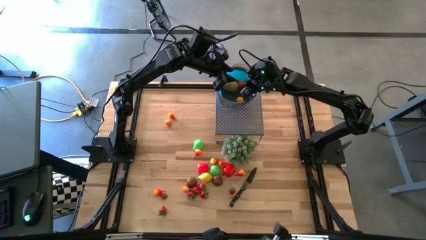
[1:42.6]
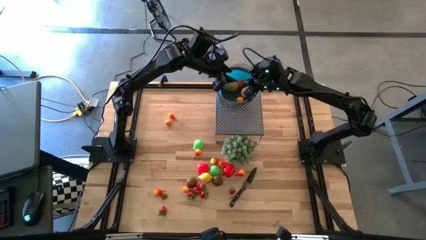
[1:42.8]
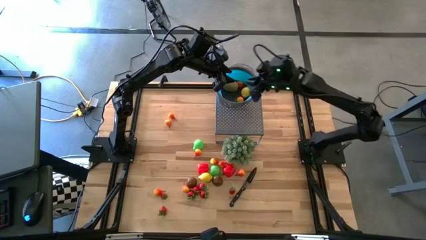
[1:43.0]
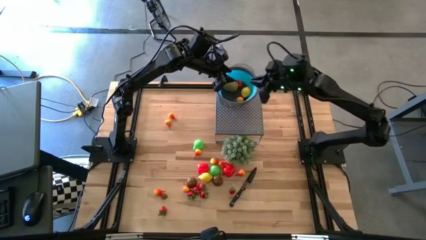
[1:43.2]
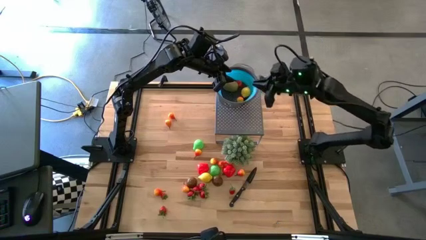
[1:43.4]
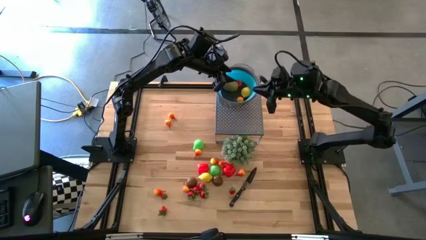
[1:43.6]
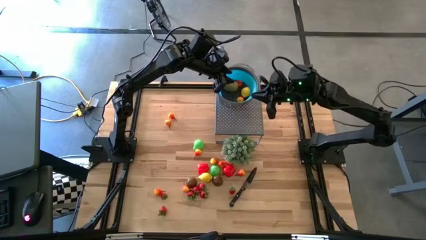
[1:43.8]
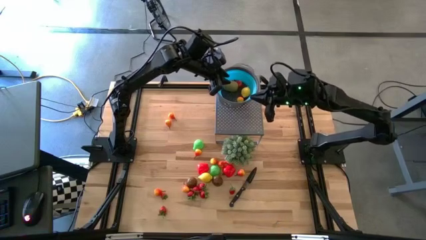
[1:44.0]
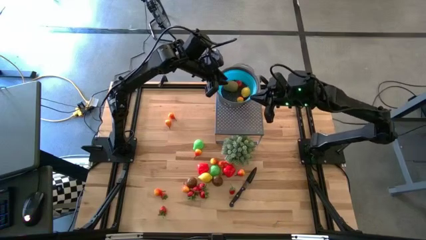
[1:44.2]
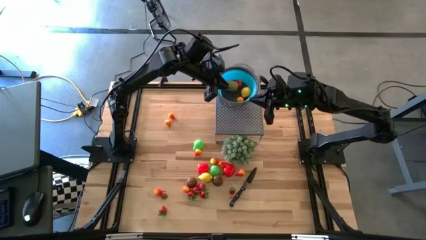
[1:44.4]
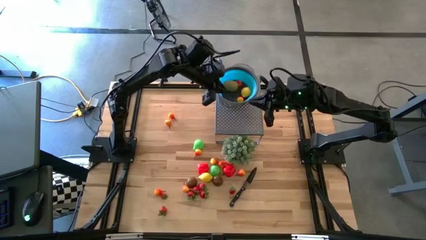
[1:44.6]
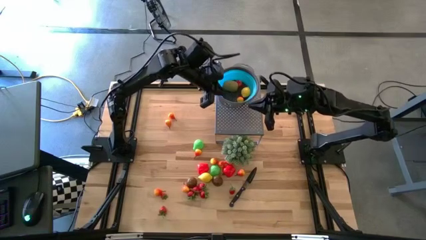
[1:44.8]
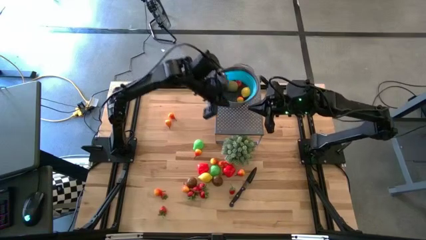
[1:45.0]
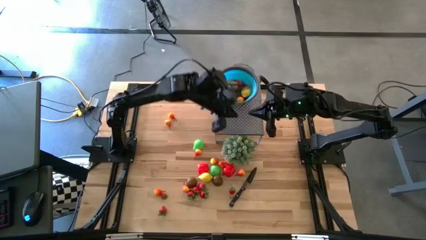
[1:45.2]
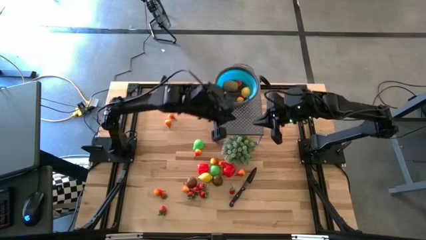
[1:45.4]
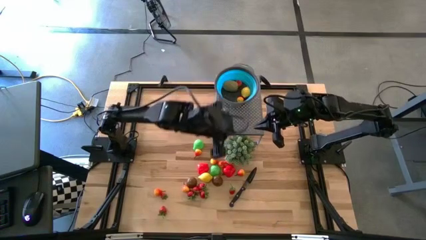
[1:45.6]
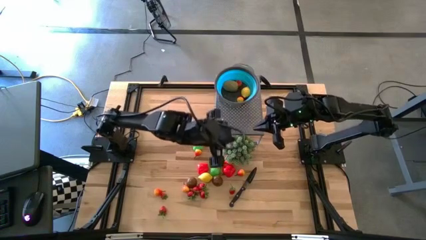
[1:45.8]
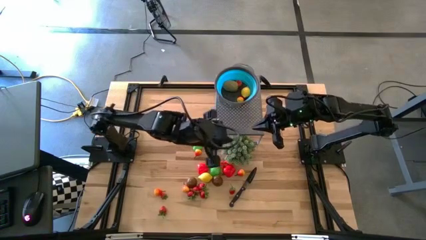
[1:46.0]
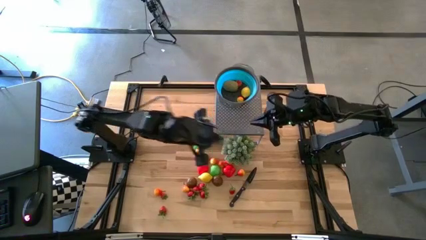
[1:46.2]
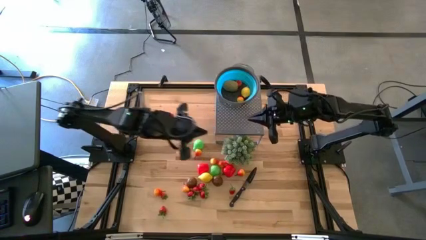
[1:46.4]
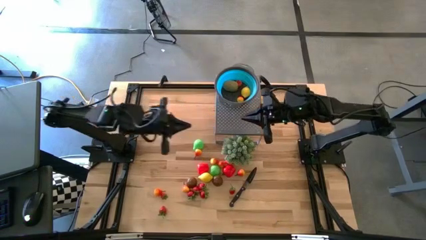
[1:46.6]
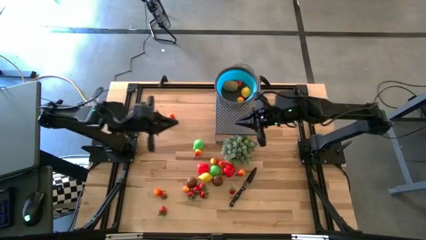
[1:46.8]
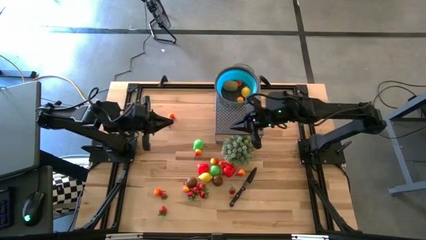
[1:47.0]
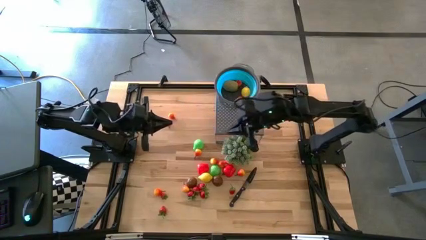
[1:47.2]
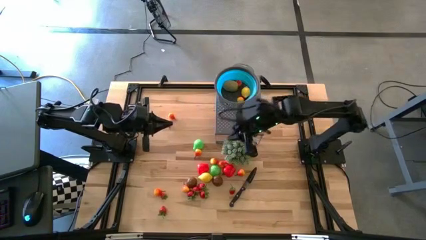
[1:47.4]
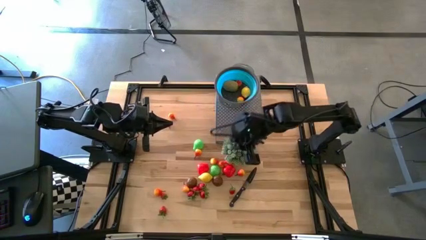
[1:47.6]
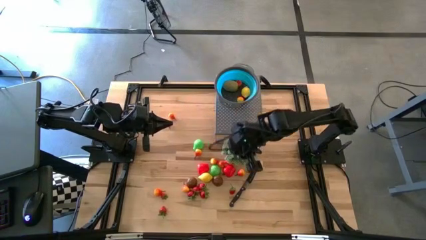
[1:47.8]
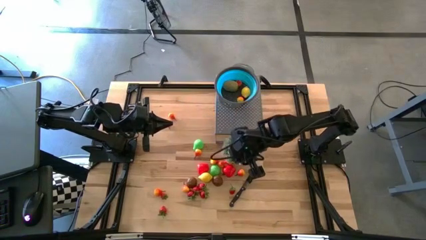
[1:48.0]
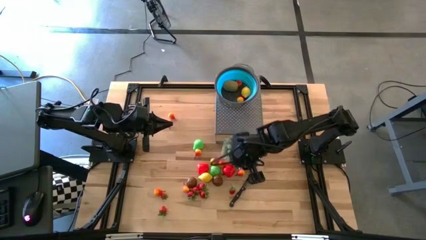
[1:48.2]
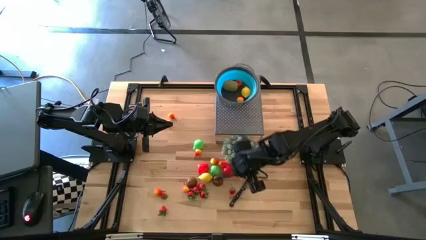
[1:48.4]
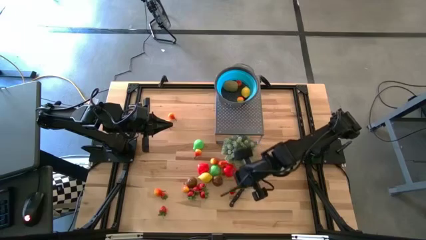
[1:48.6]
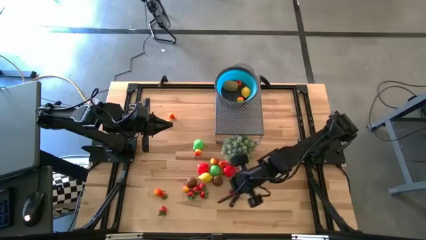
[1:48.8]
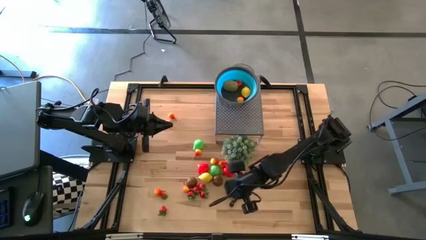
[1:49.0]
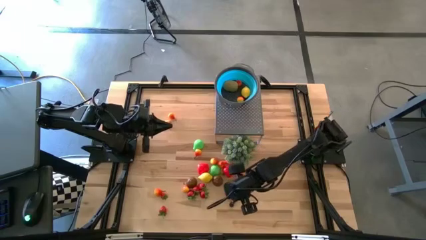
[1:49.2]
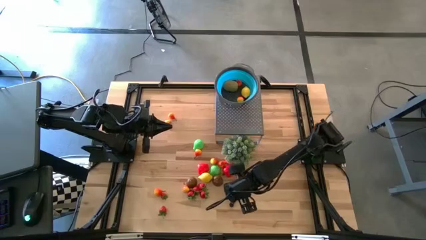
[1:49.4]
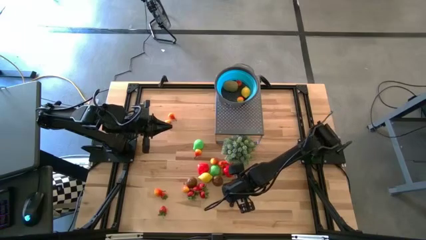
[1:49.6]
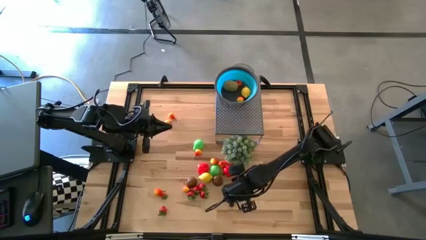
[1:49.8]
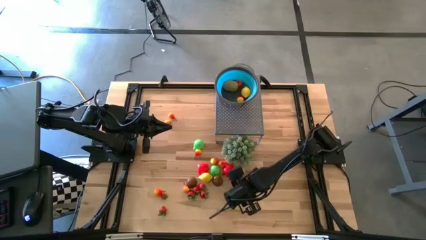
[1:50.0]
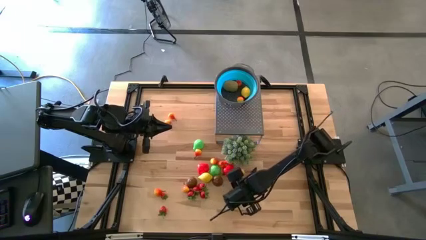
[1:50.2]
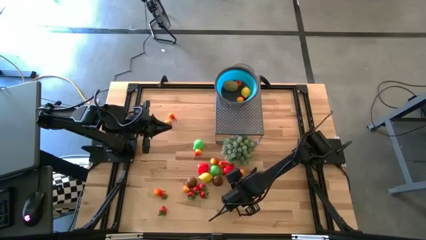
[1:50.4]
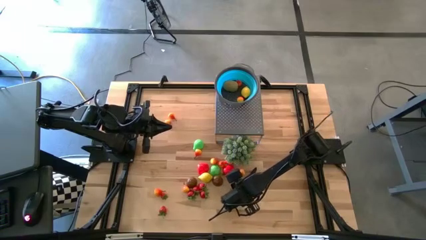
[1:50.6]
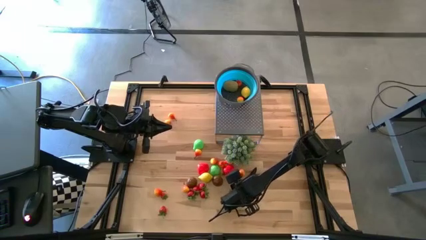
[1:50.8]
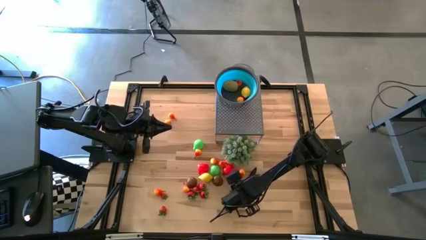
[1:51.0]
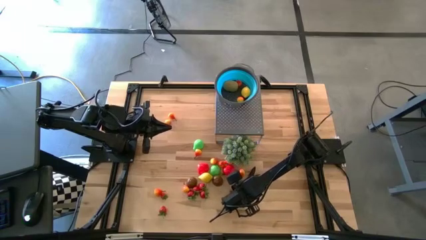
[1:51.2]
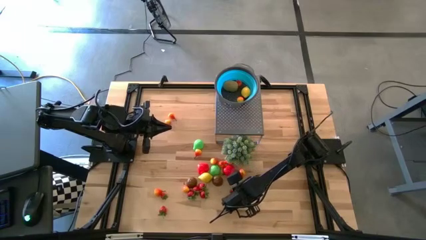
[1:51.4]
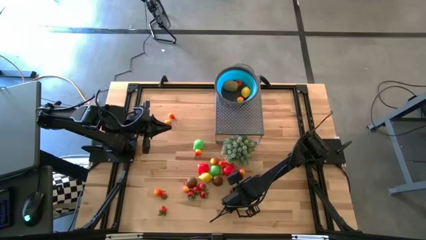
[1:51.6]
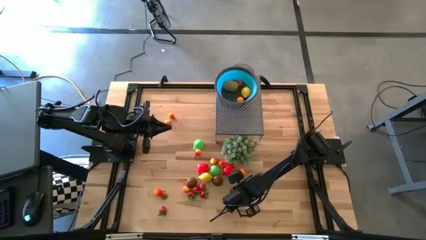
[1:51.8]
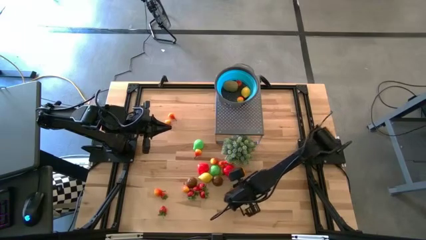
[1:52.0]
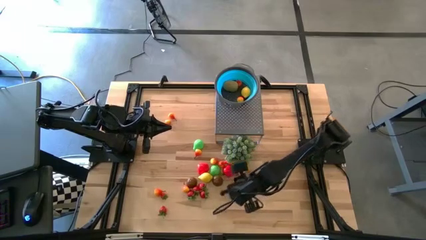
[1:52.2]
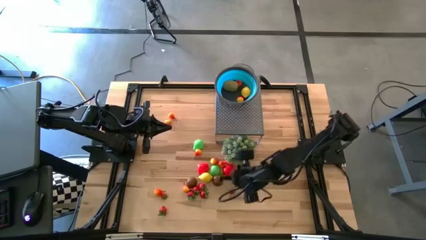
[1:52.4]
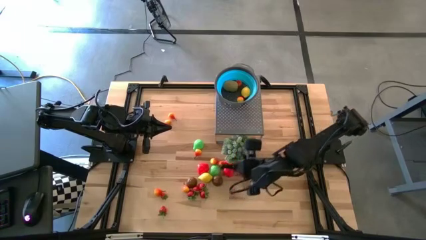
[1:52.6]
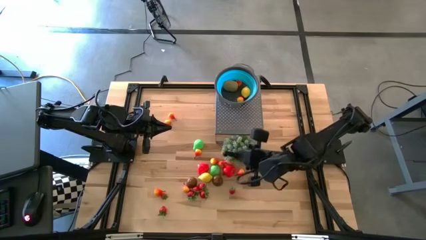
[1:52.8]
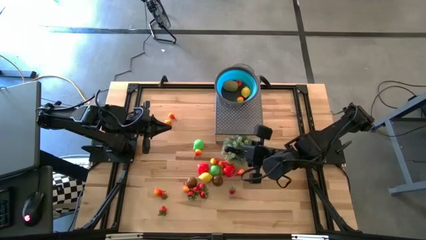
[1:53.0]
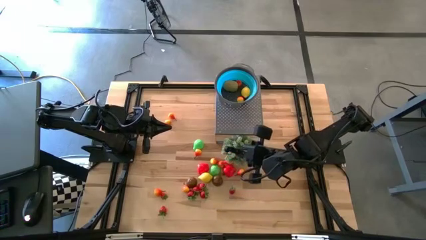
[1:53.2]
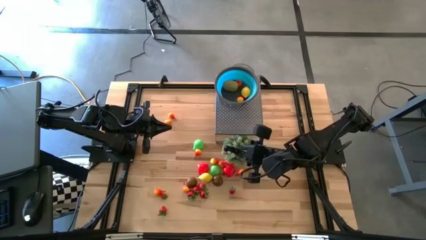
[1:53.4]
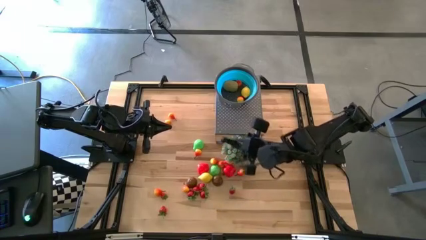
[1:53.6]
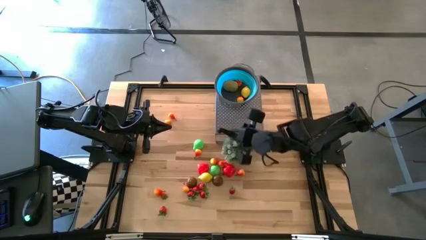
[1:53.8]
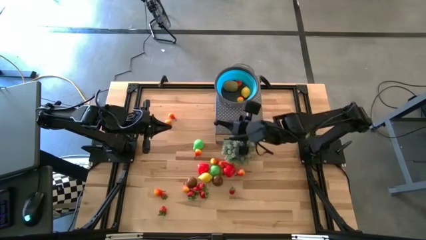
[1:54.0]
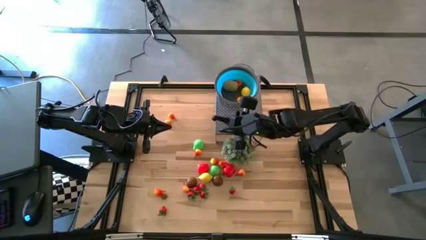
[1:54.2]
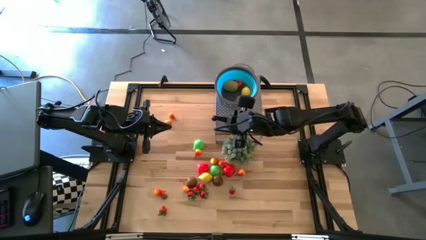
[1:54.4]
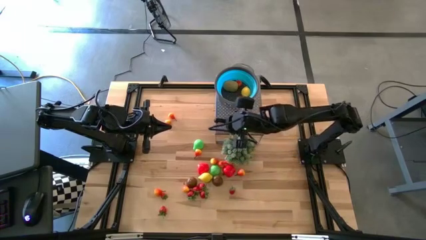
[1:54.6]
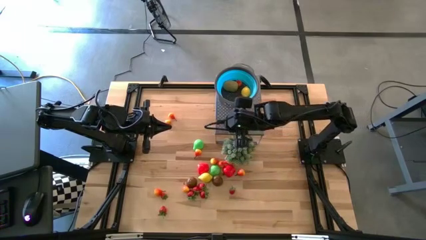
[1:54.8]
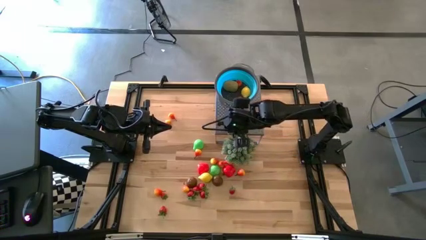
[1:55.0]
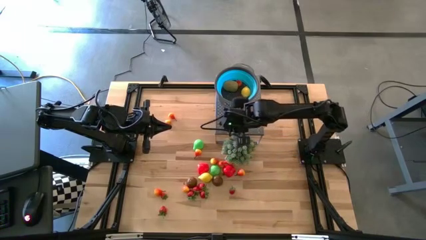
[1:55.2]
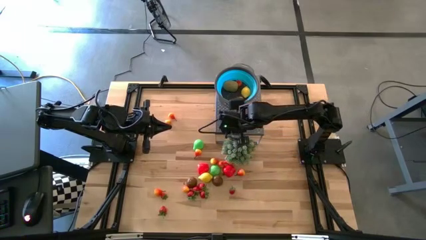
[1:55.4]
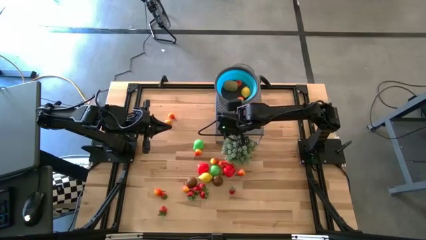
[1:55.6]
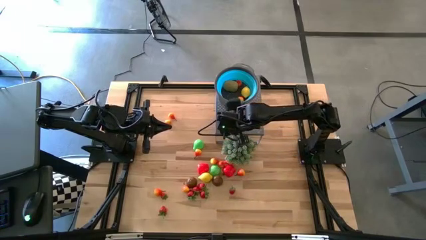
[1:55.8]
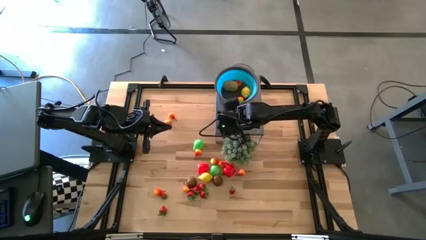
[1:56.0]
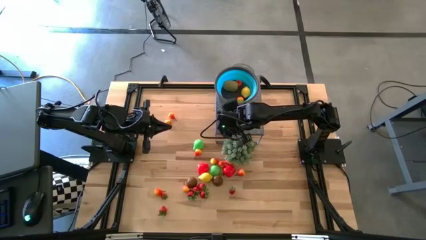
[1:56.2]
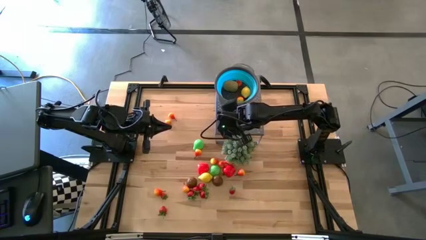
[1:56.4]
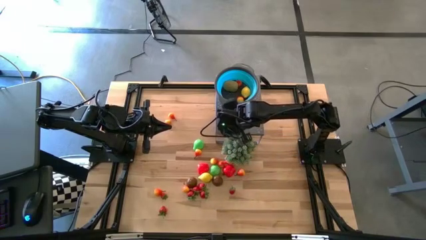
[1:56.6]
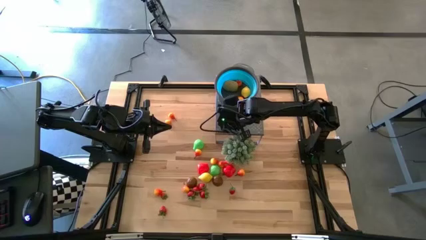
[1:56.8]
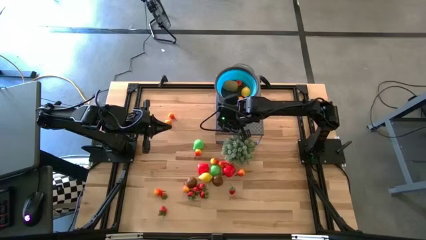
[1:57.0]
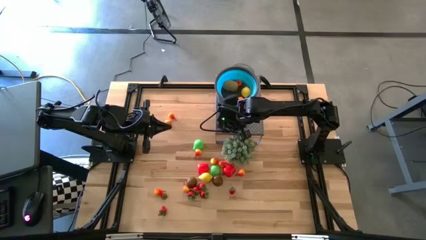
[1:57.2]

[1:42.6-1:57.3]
Task: Pick & Place Fruit
Put the black knife on the shelf

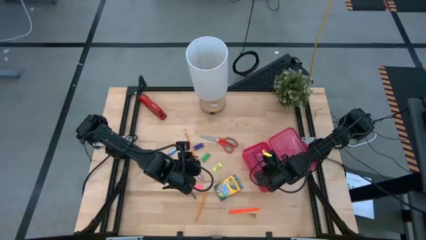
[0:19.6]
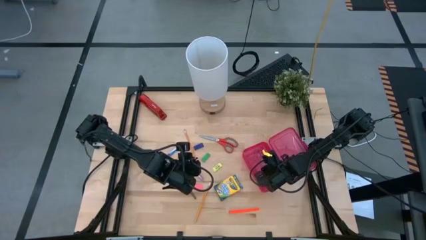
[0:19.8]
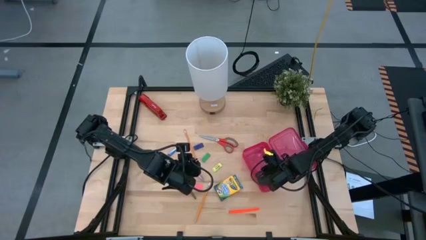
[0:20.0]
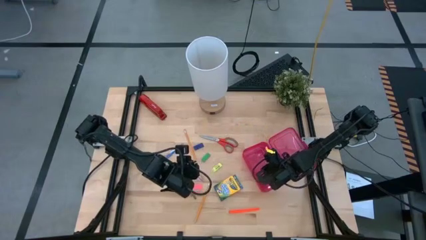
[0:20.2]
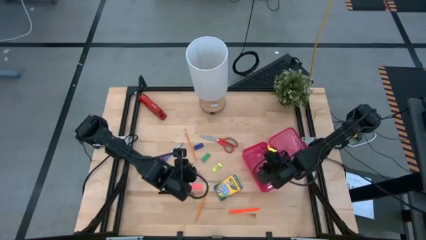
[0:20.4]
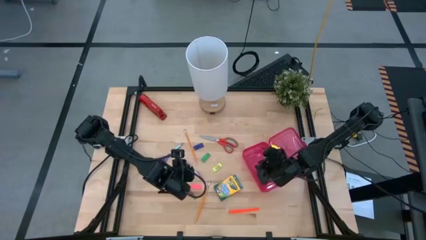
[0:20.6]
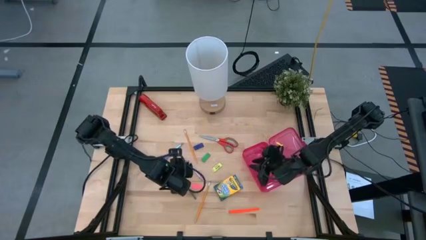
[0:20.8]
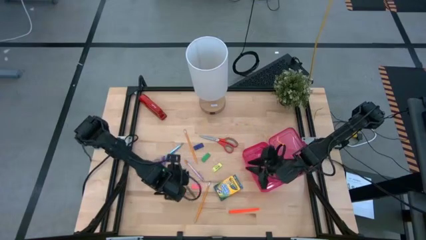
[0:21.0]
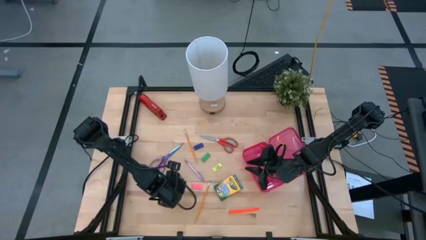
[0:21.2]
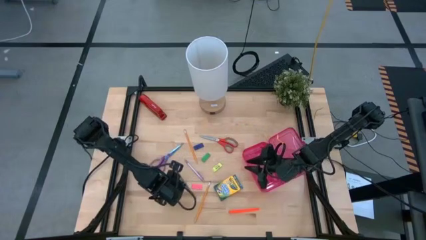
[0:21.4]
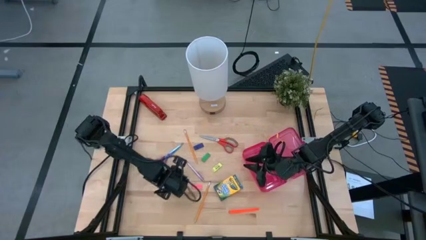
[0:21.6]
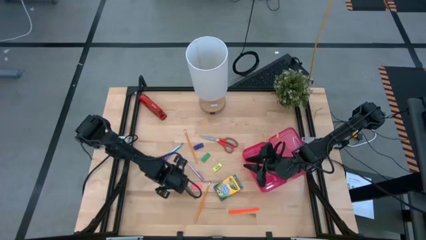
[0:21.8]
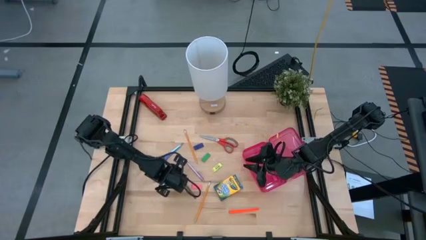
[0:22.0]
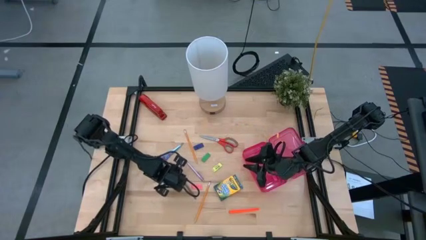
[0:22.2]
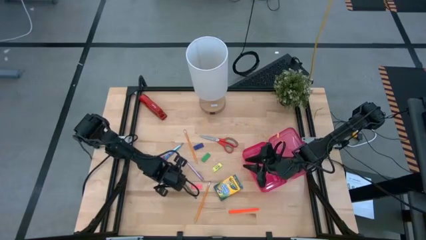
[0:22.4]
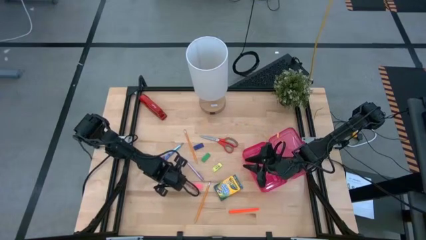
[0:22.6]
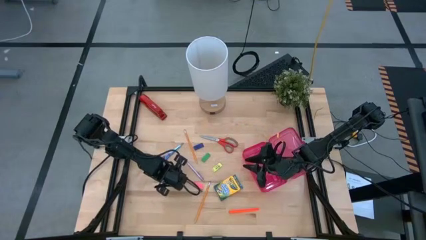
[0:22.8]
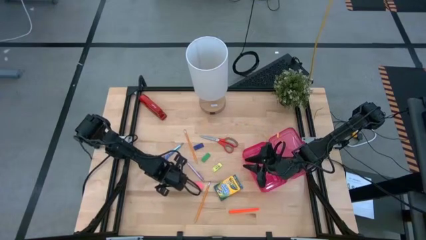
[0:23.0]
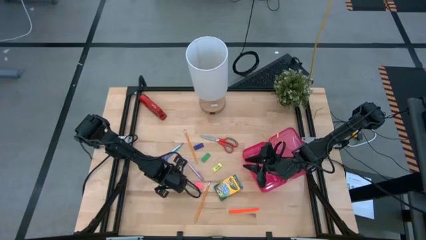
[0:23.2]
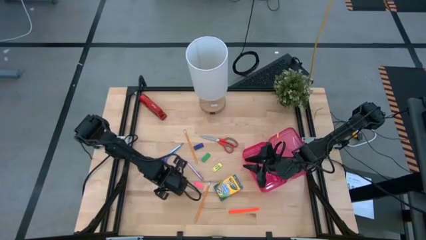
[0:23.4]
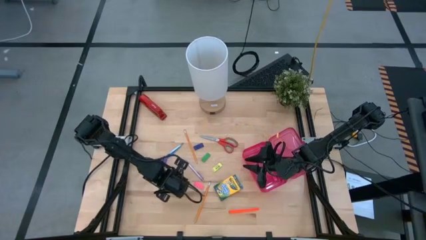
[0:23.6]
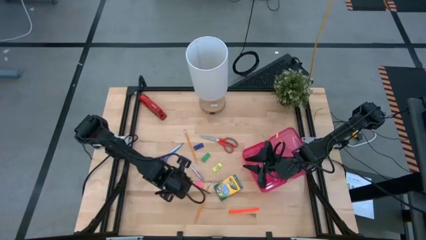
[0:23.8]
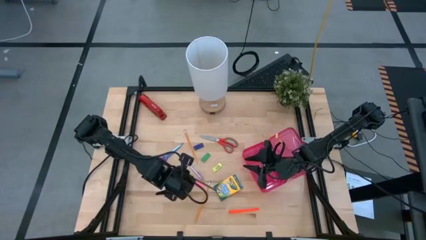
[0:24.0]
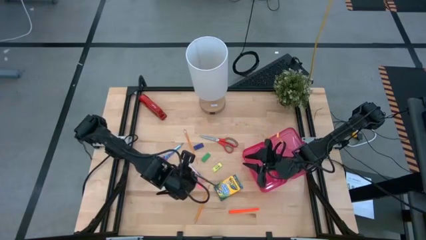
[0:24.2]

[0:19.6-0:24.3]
Task: Pack school essentials
Put the blue pencil into the pink supply box
